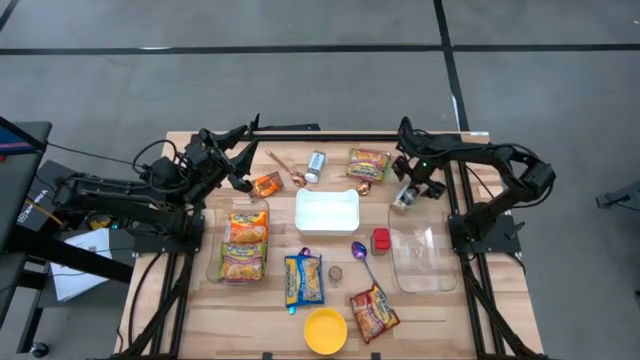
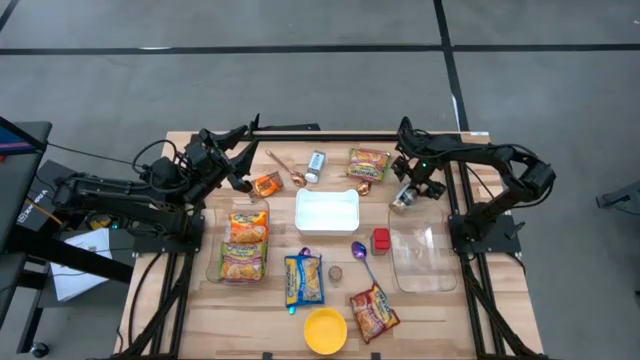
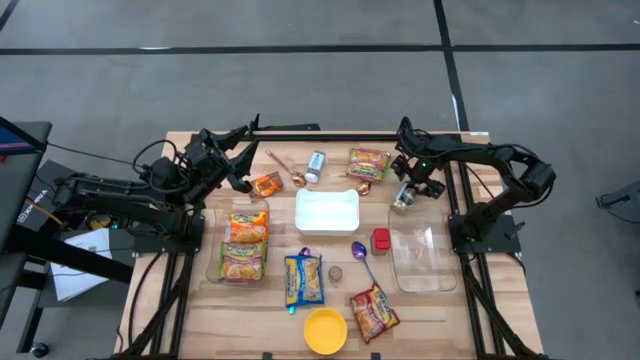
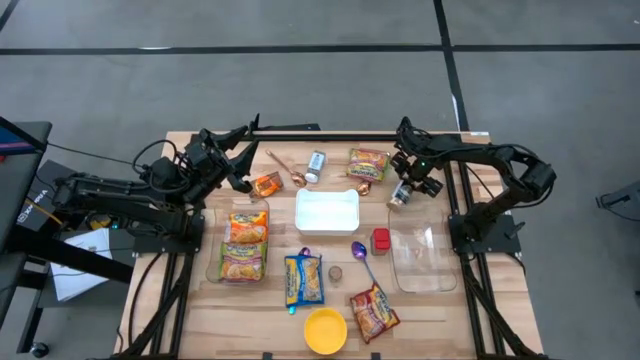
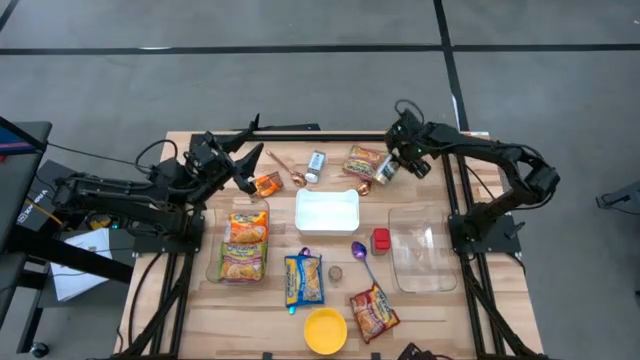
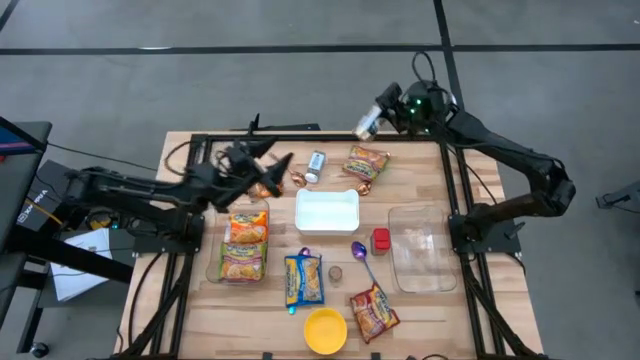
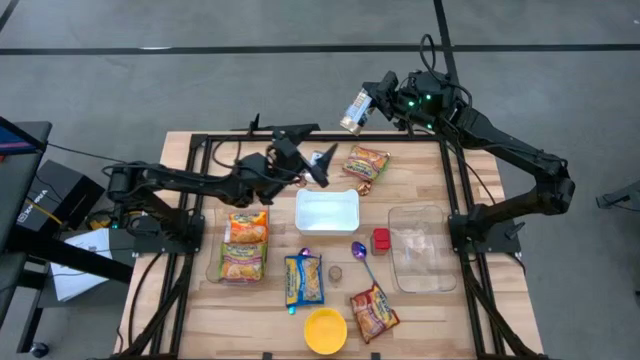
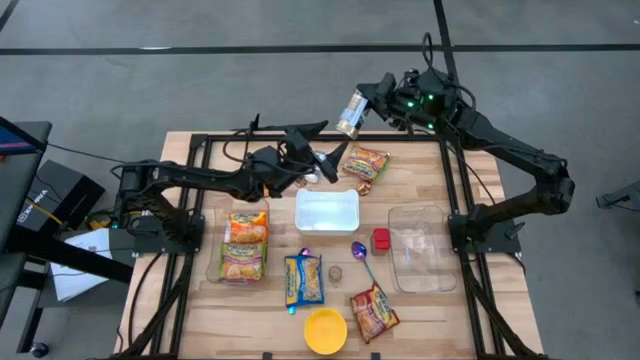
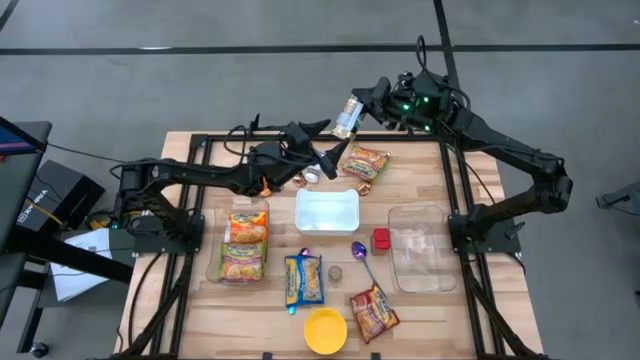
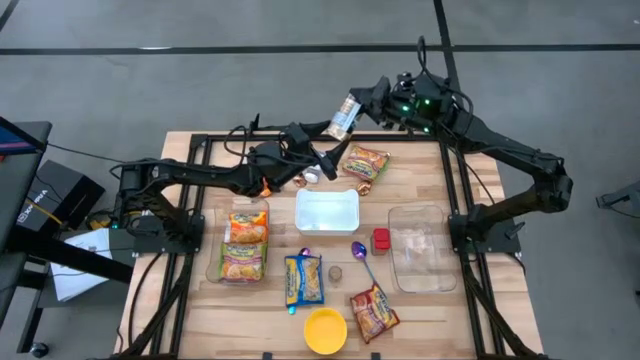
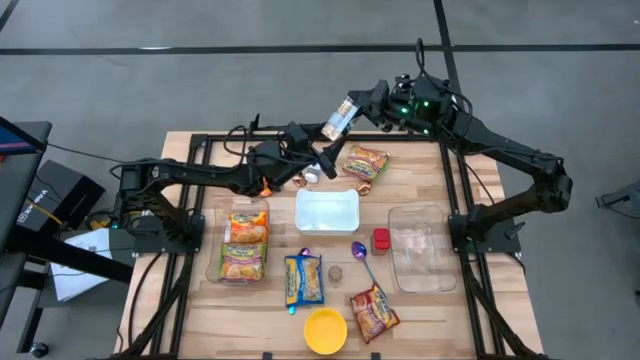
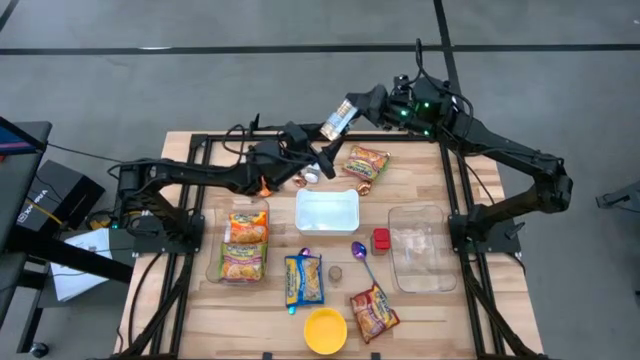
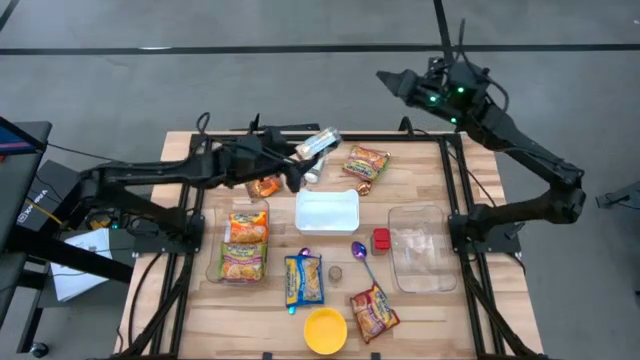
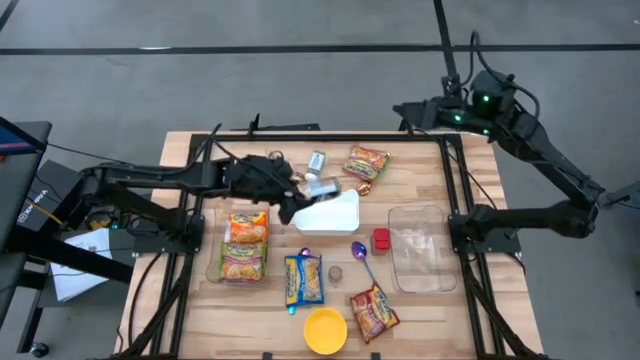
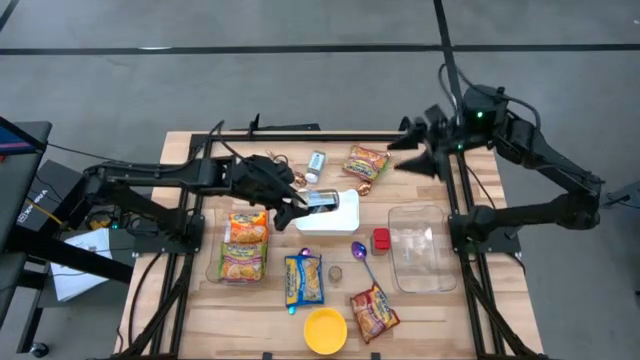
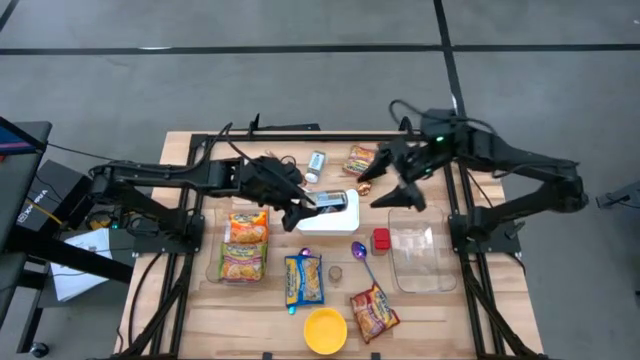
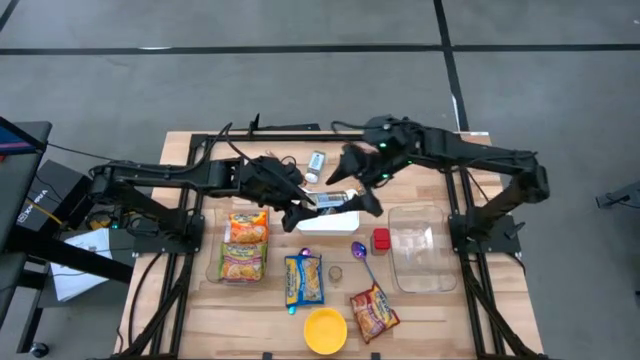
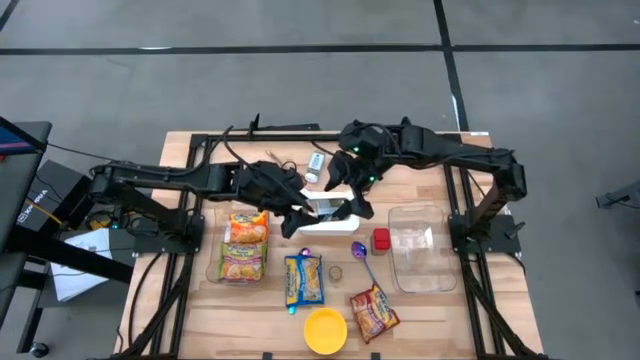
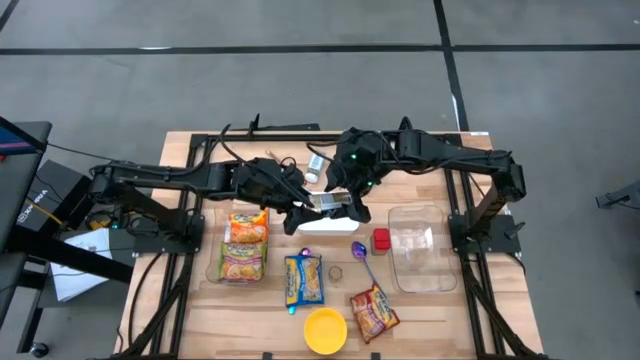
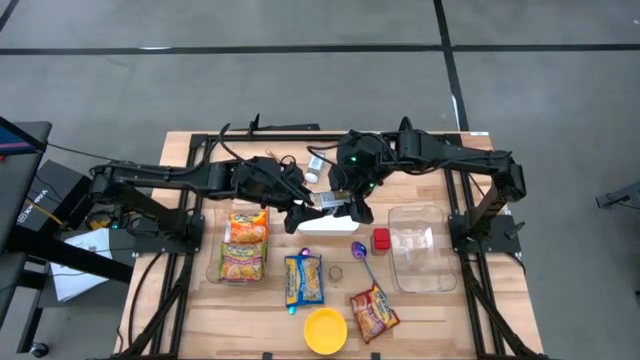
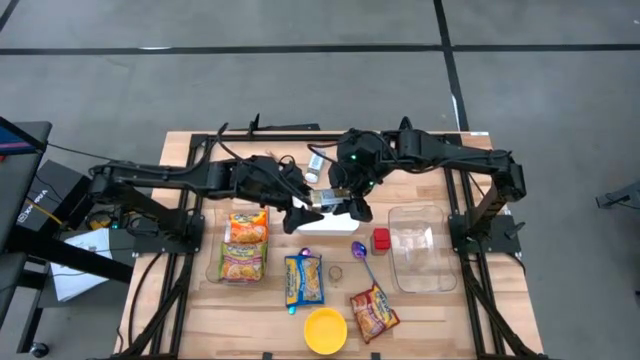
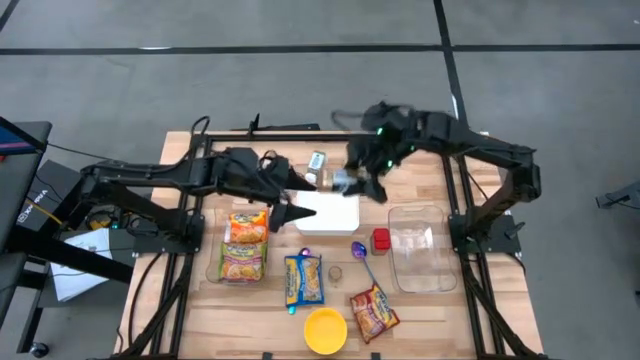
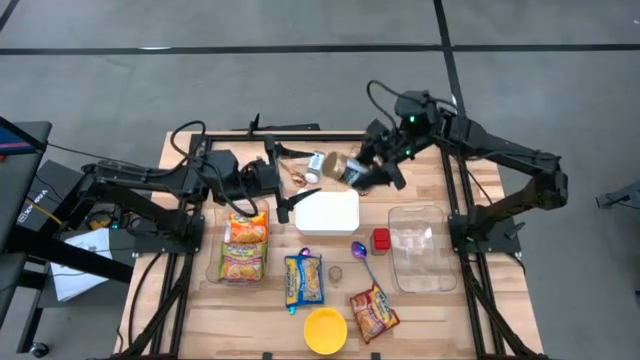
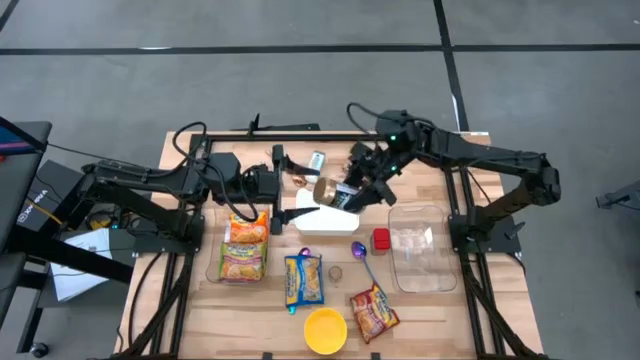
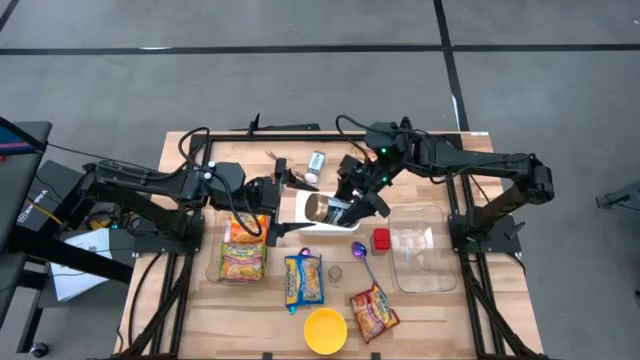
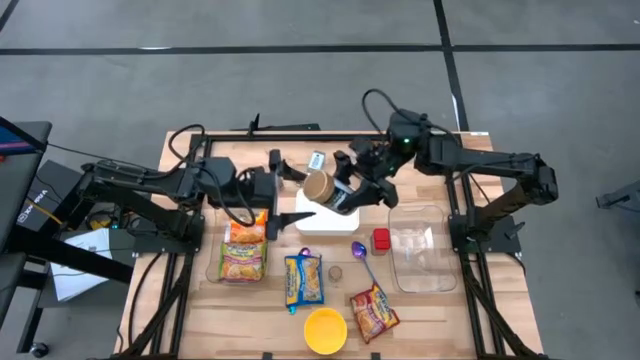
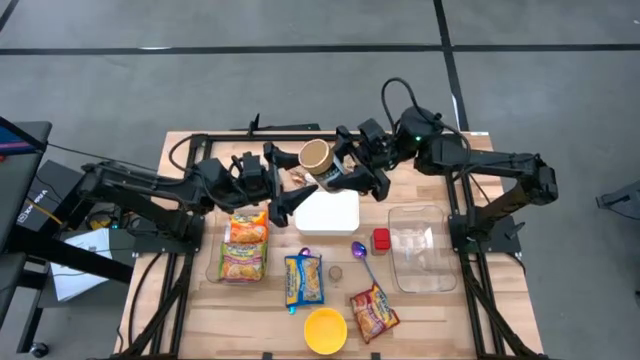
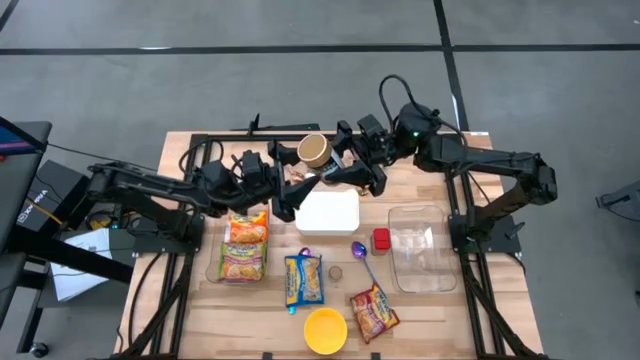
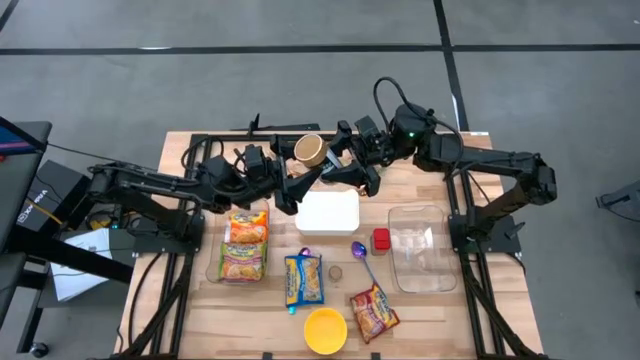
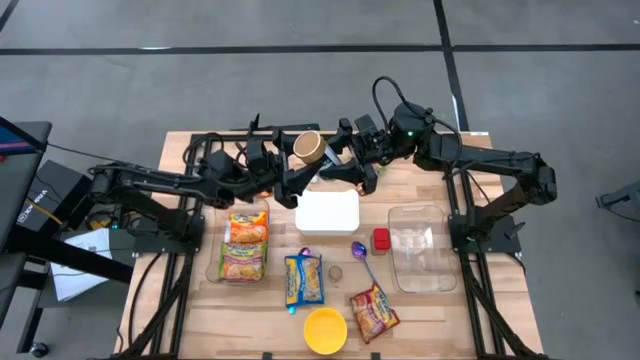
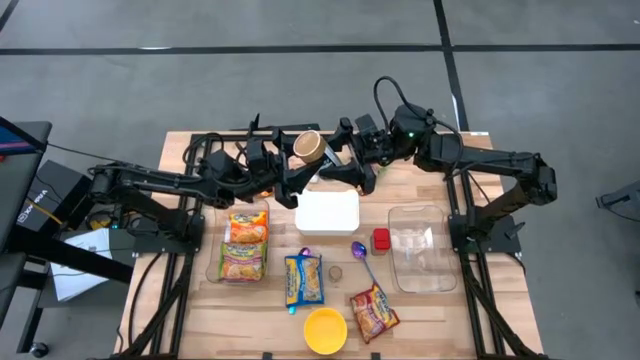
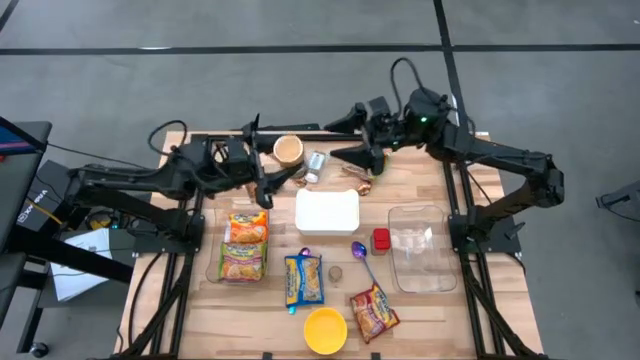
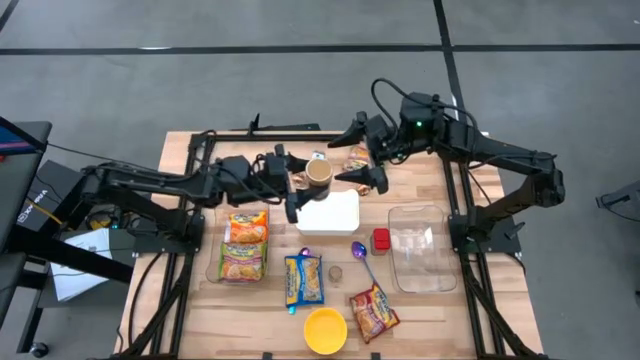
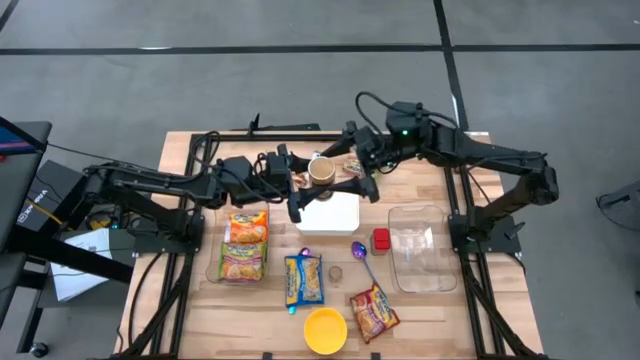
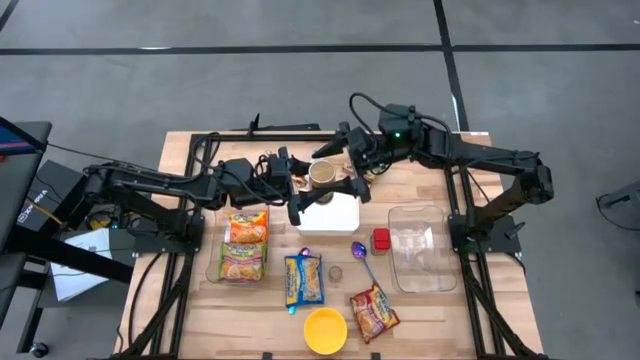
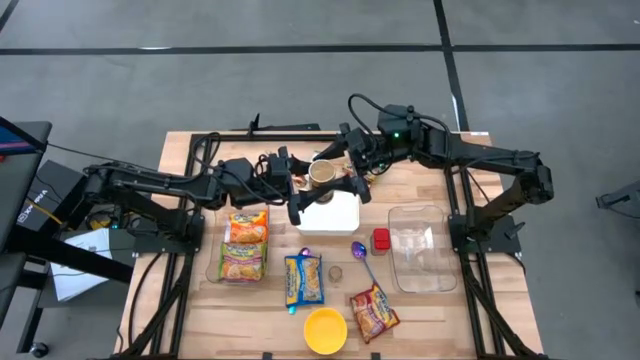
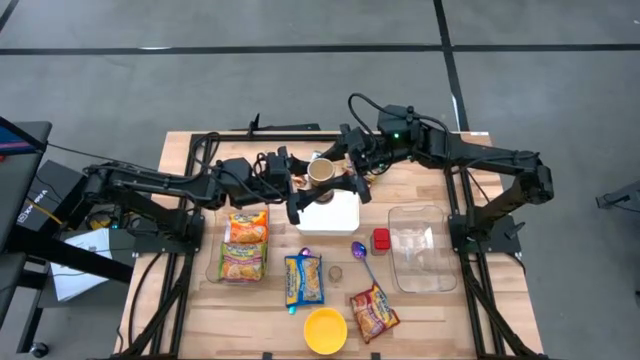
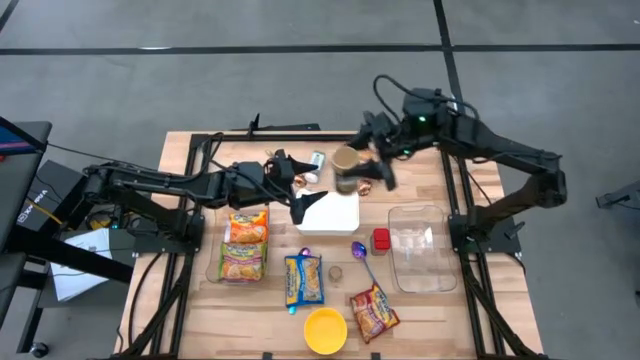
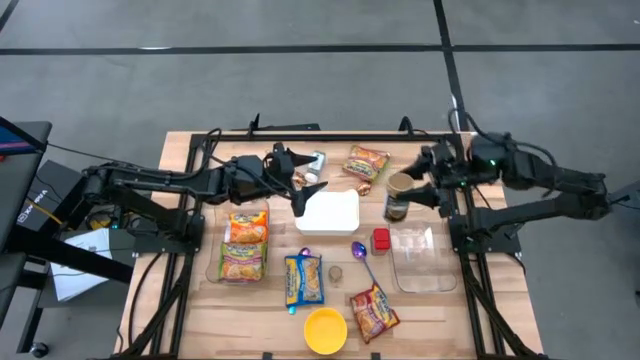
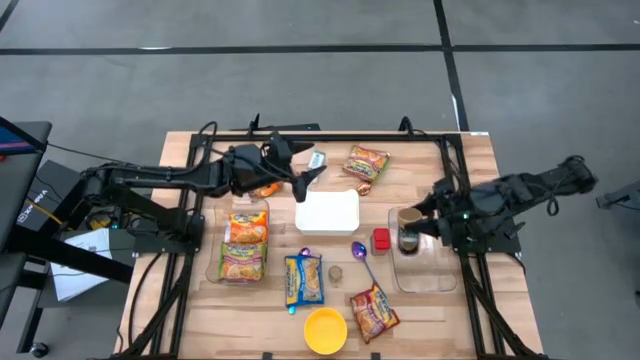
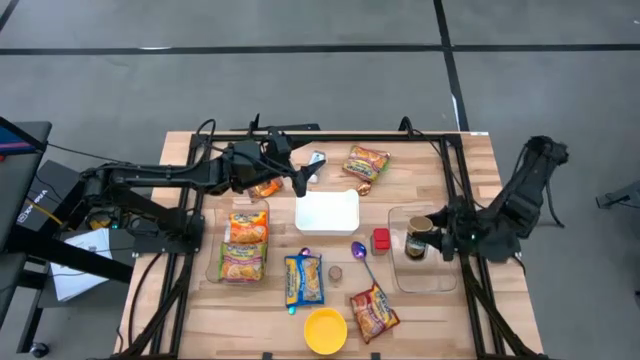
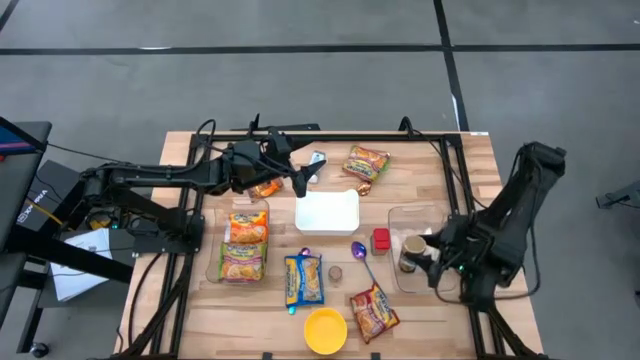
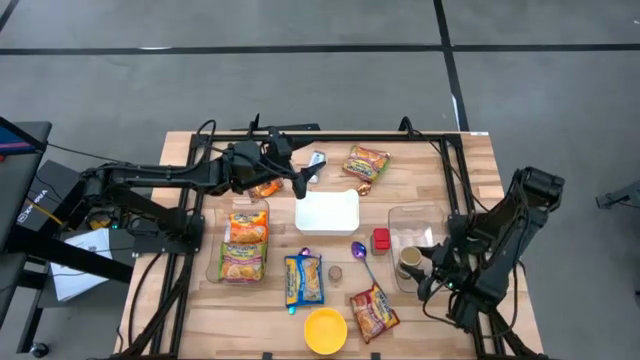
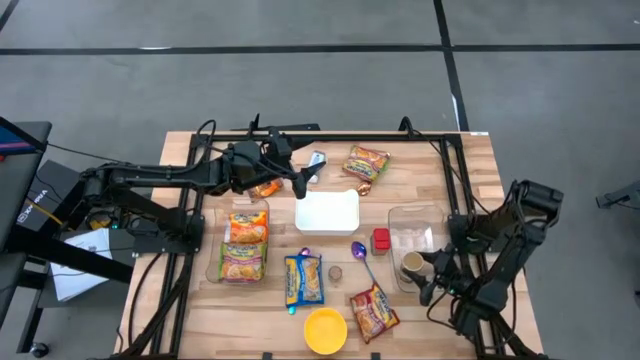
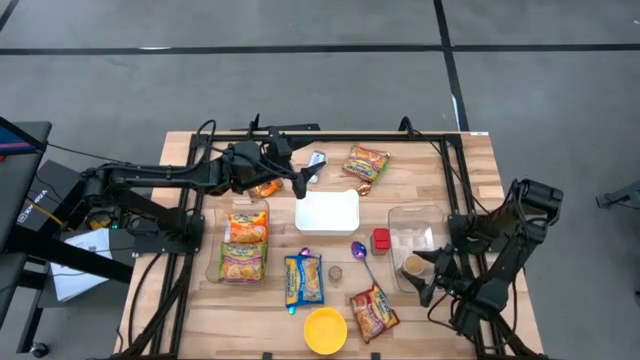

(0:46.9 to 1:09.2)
Task: Pick & Place Food Item
Put the gold seasoning bottle into the right transparent bin
